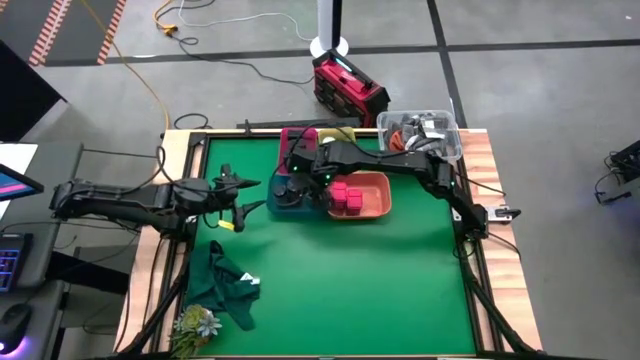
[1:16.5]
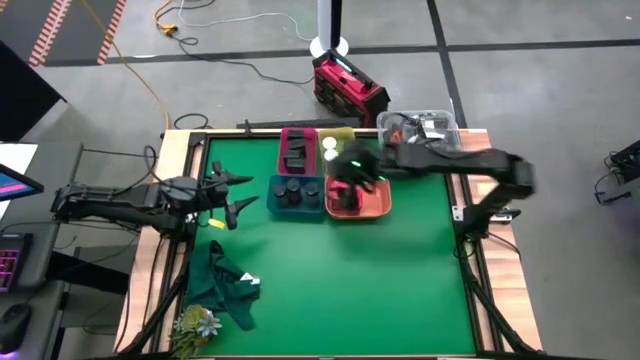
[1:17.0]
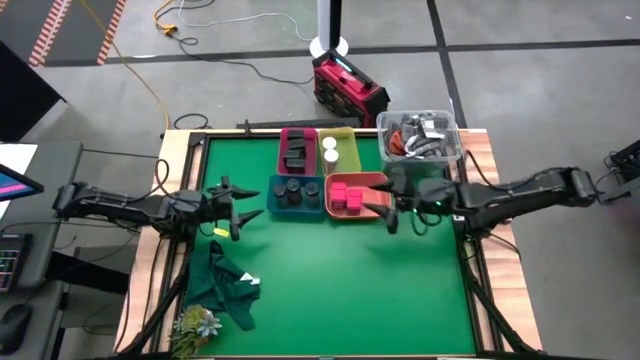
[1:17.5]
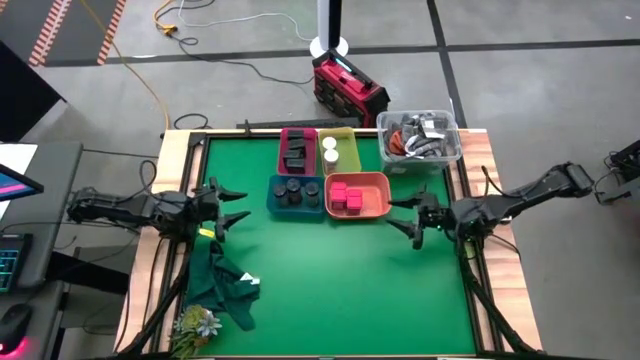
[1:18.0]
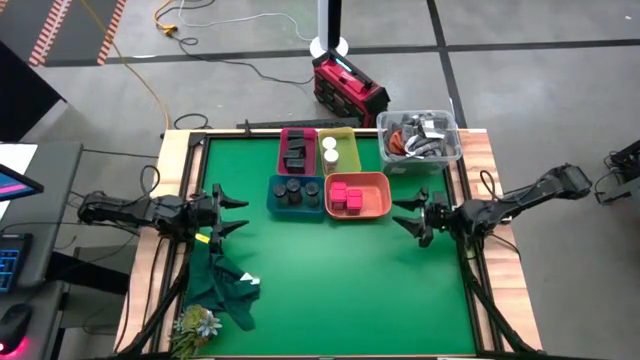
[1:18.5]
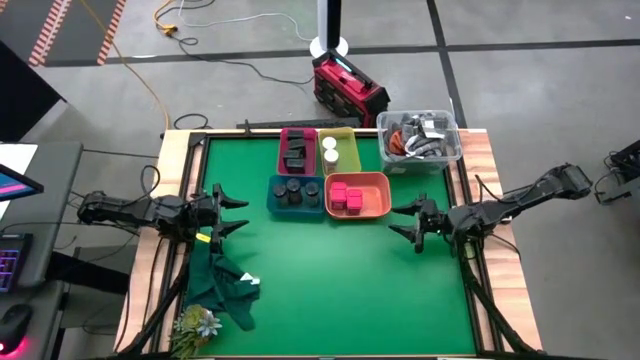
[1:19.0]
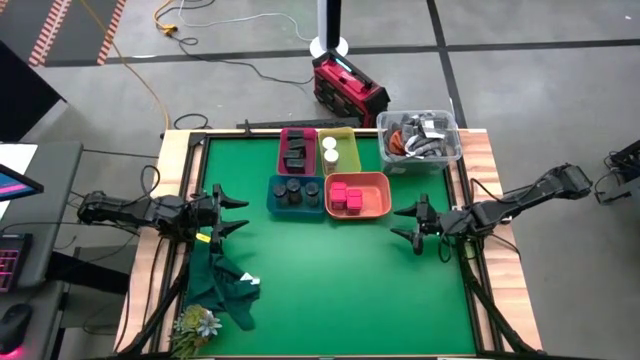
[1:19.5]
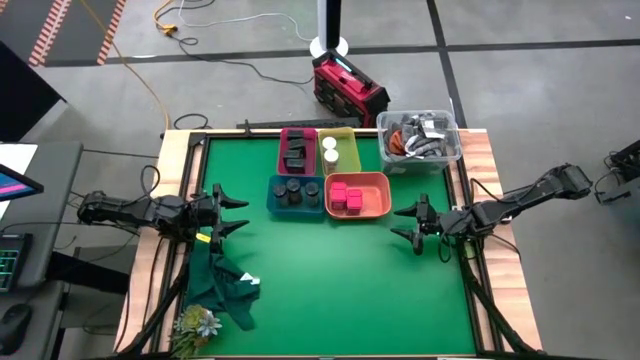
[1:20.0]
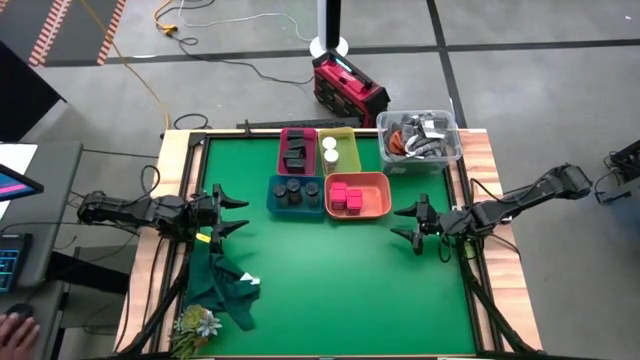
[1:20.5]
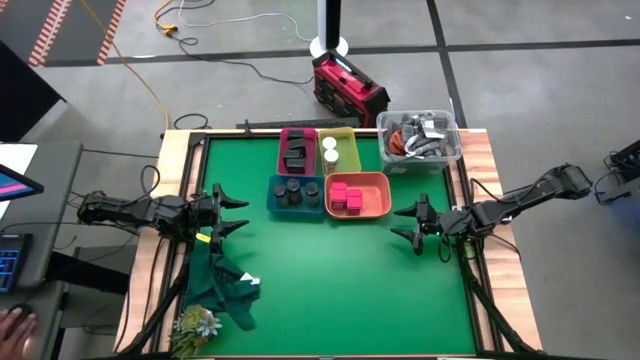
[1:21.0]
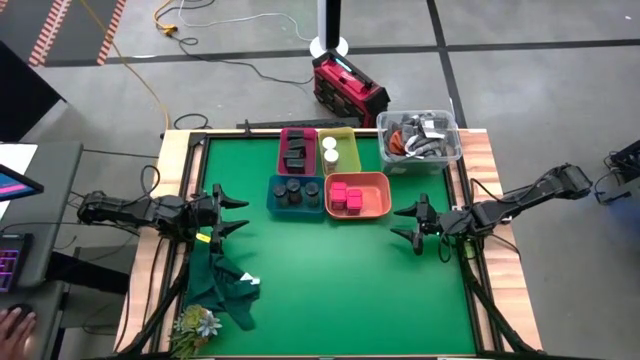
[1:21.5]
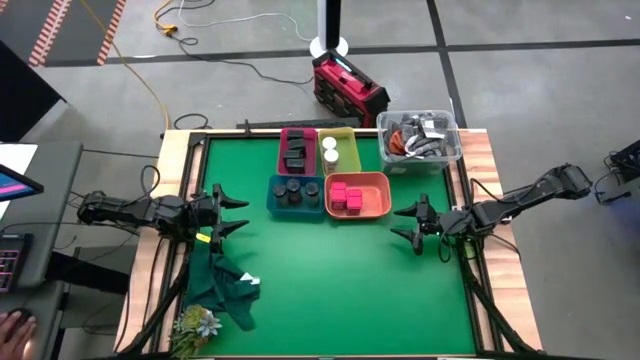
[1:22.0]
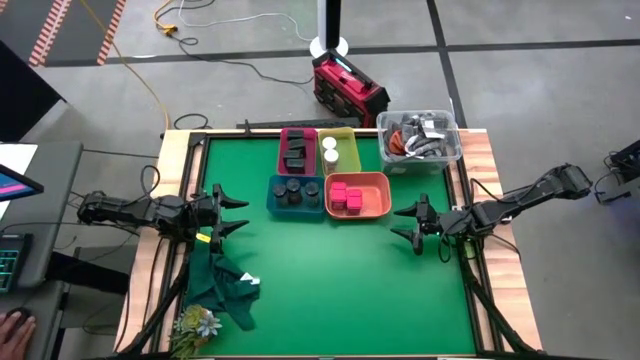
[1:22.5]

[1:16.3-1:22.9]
Task: Sort spices by type
Return to Home Position

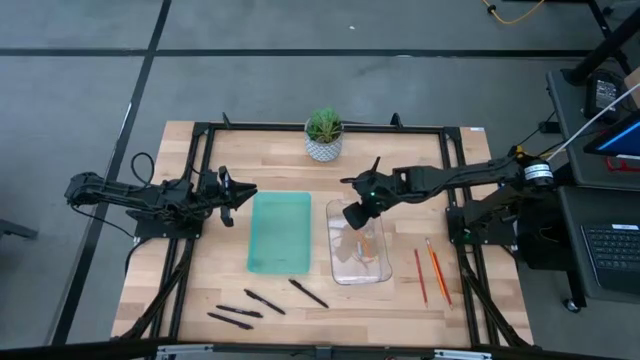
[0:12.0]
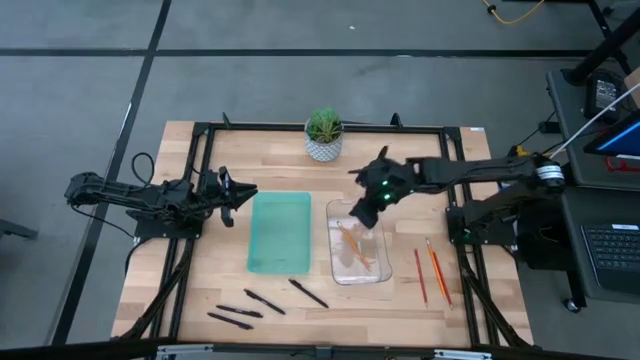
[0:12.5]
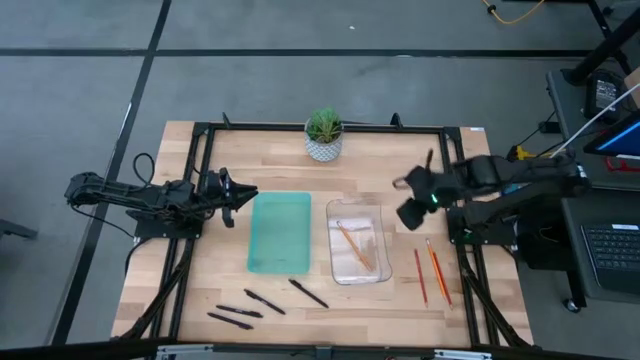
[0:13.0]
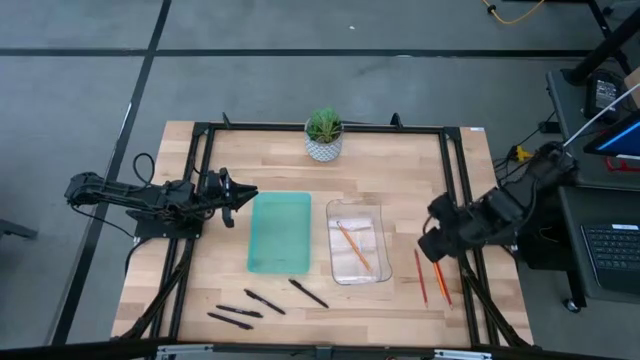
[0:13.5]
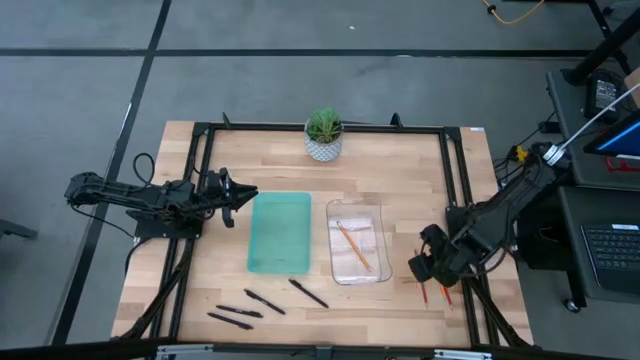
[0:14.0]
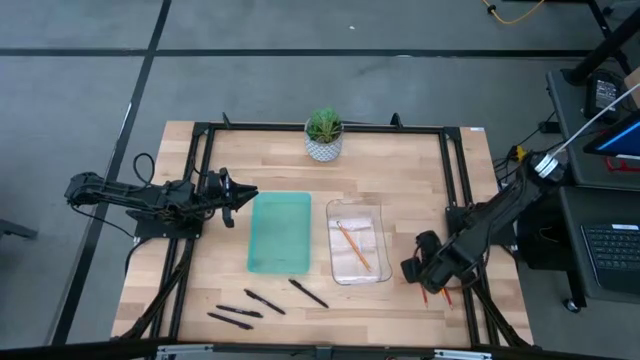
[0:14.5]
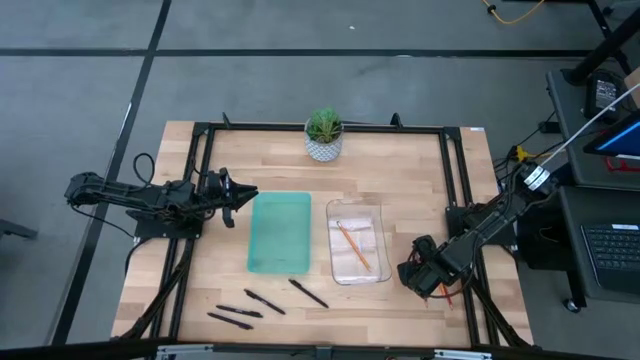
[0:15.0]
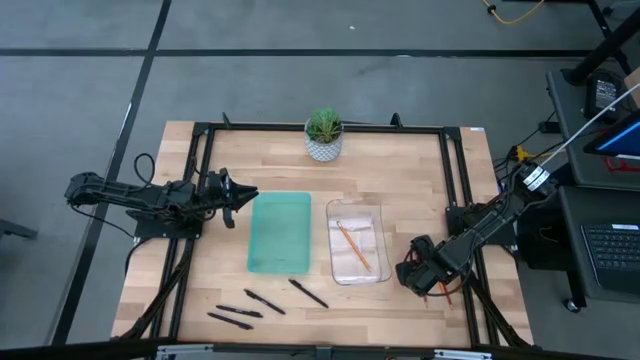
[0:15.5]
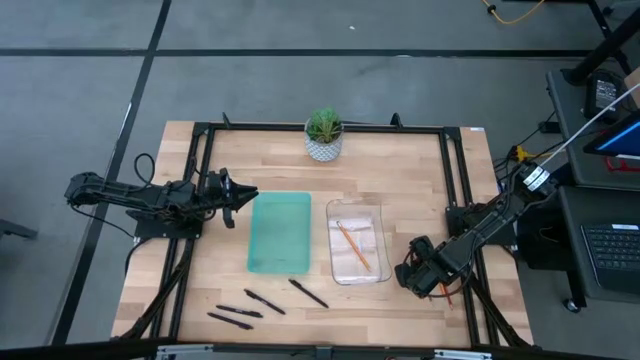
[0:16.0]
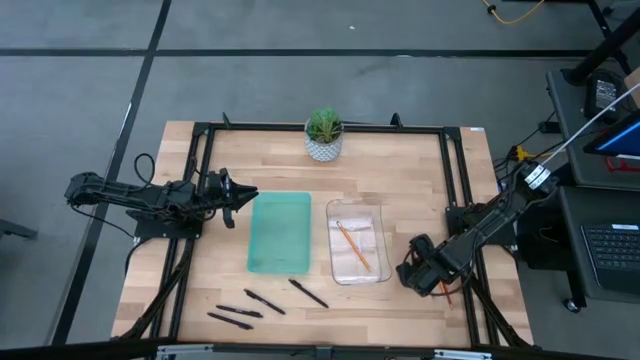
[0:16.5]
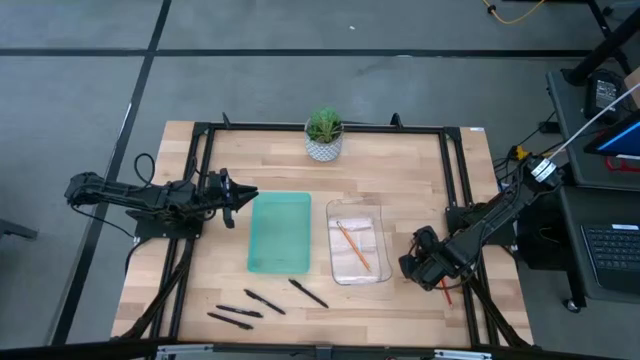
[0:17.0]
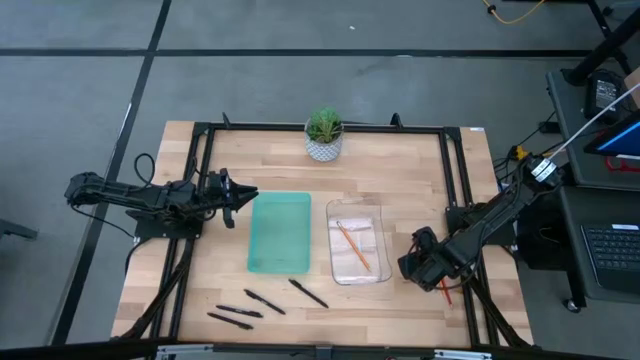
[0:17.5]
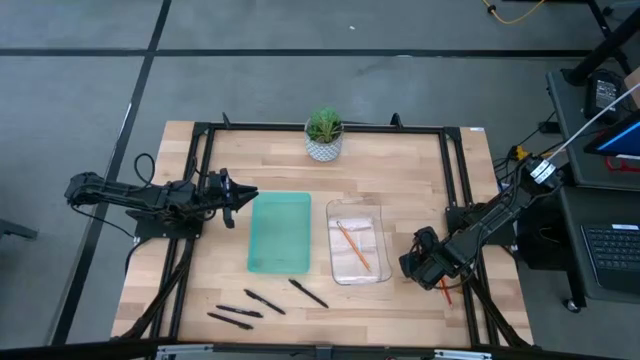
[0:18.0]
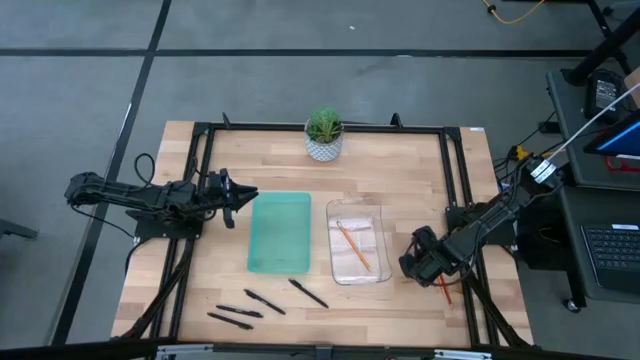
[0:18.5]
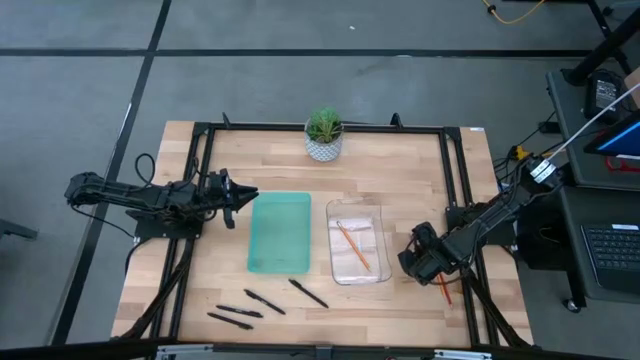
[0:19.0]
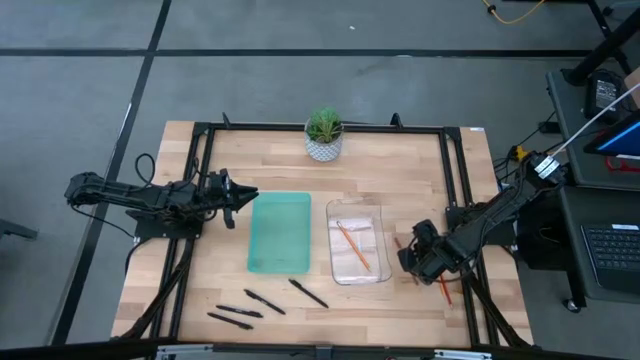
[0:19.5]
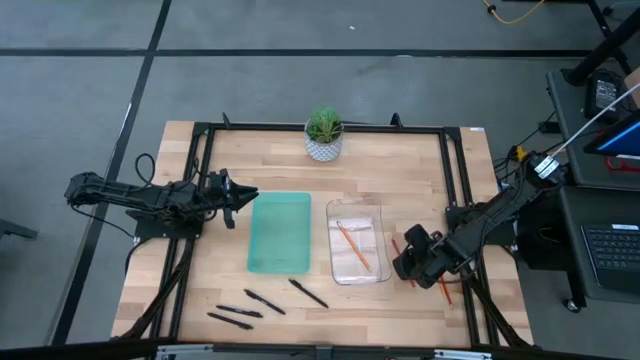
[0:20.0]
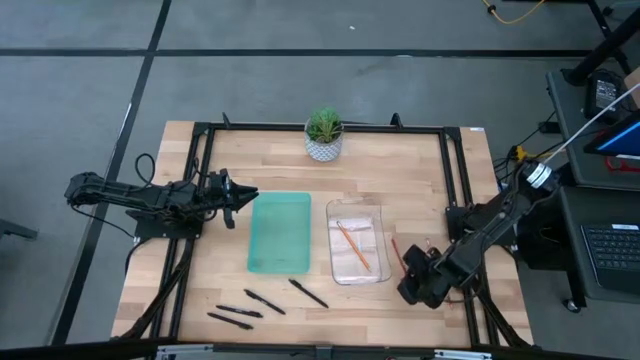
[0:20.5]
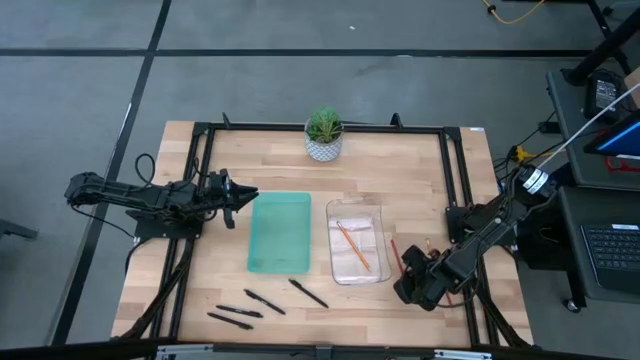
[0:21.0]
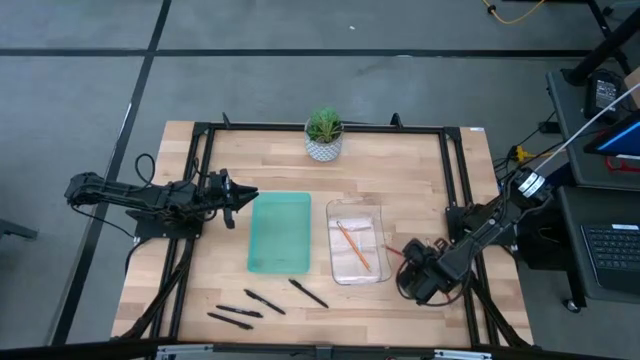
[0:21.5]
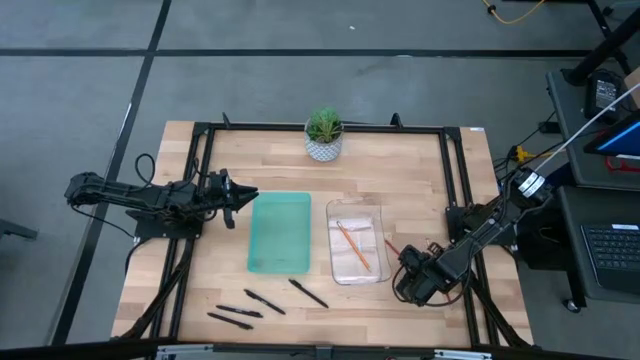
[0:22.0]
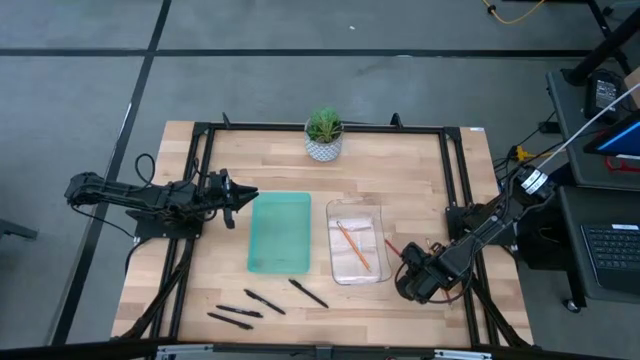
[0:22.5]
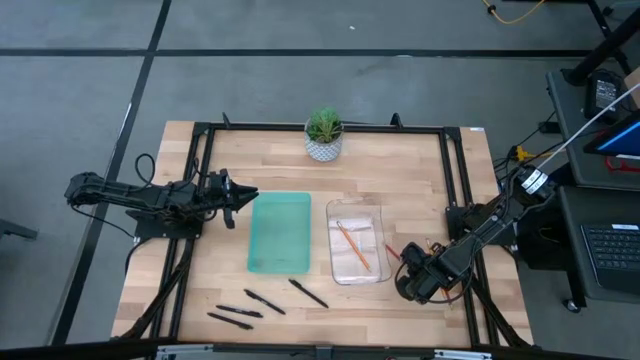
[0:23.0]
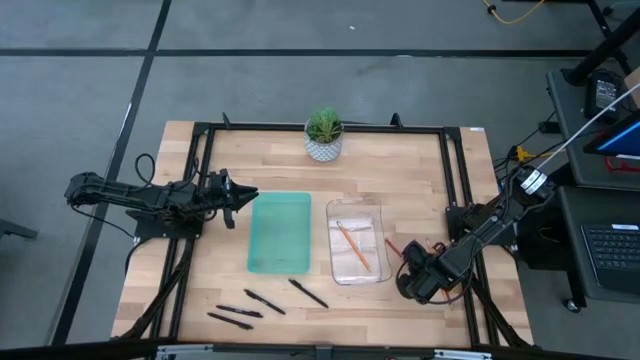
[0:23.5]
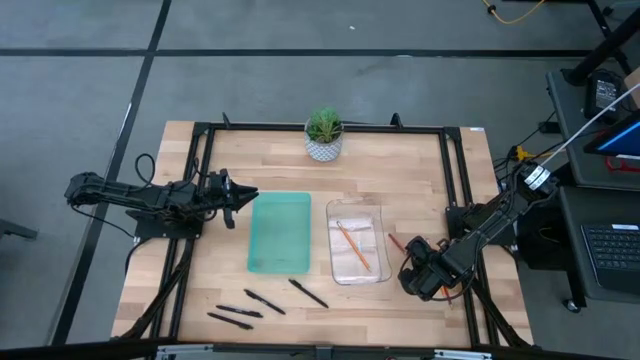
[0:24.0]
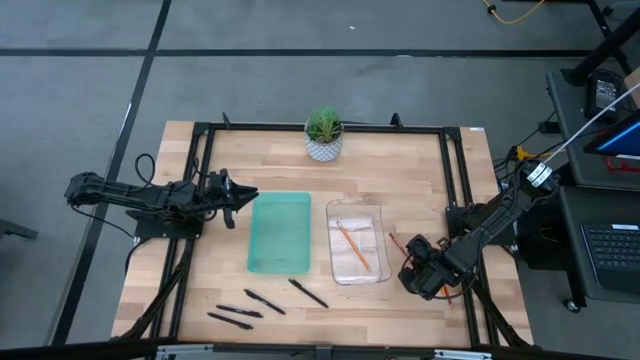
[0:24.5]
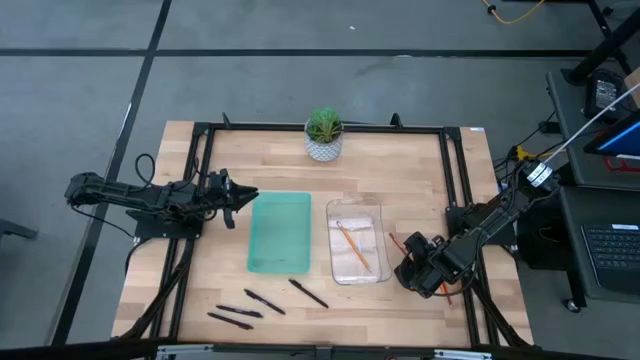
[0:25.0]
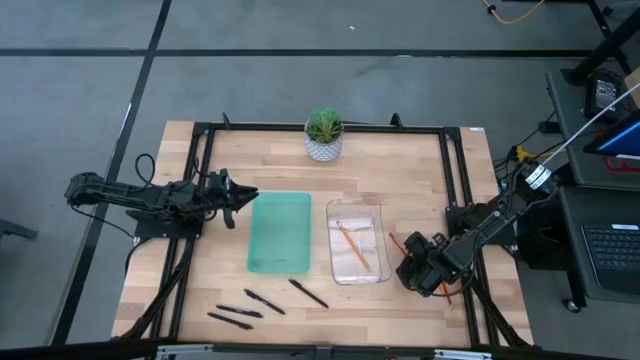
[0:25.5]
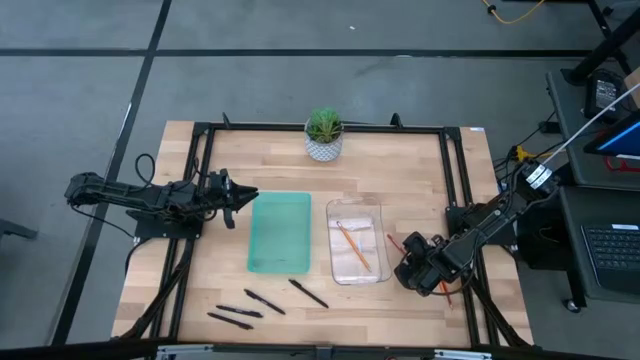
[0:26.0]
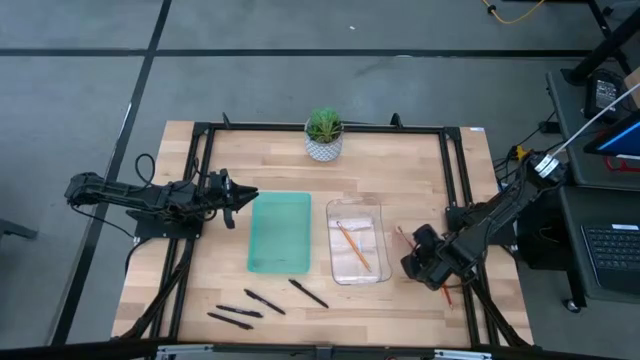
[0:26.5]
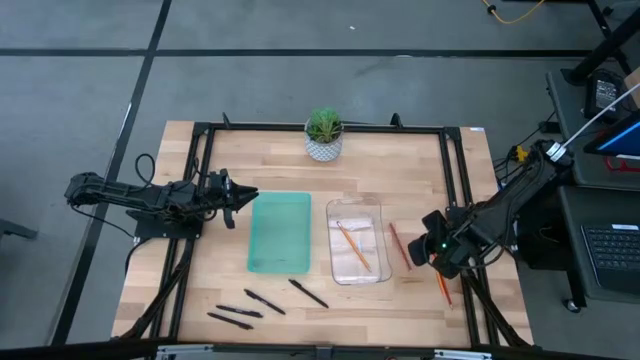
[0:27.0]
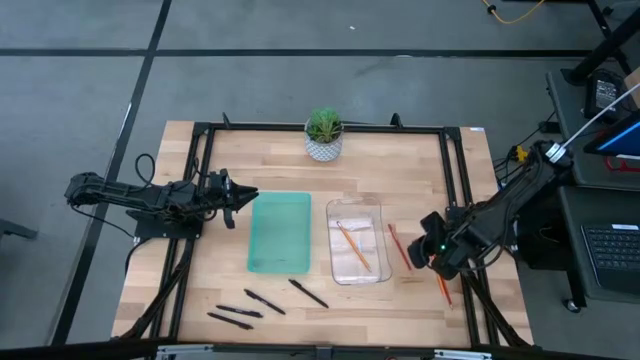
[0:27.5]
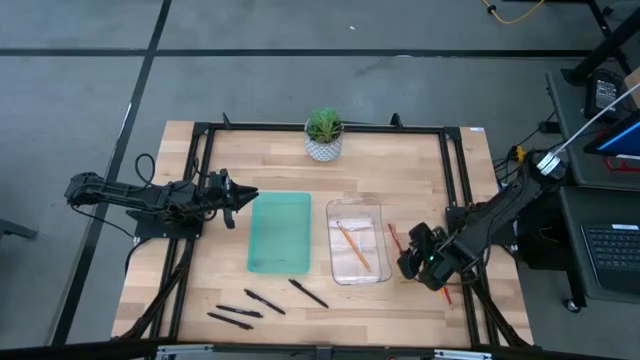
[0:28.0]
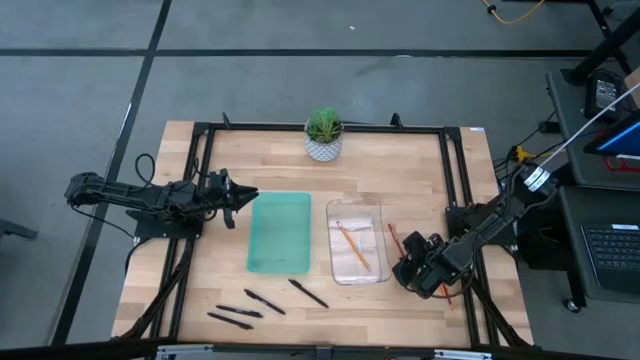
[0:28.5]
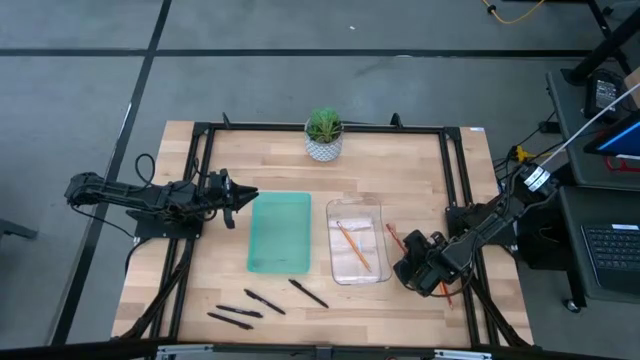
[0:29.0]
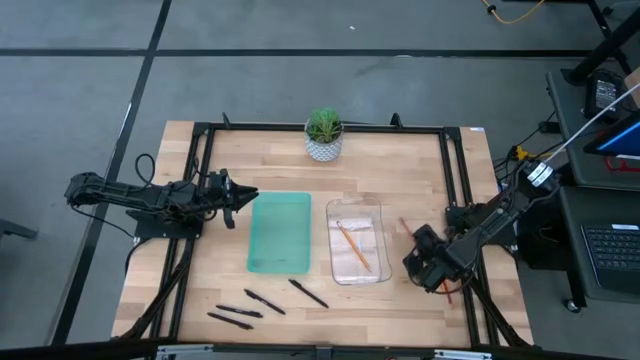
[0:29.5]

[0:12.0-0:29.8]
Task: Sort pens & pencils
Put the red pencil into the transparent bin
